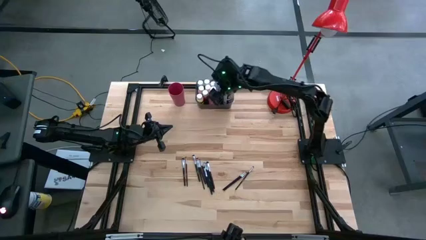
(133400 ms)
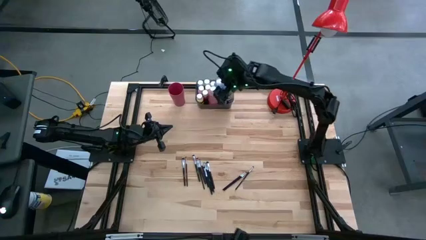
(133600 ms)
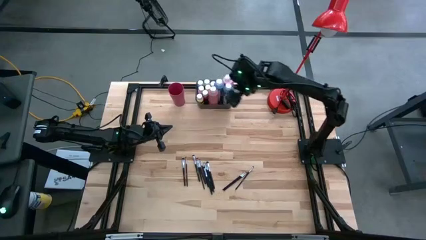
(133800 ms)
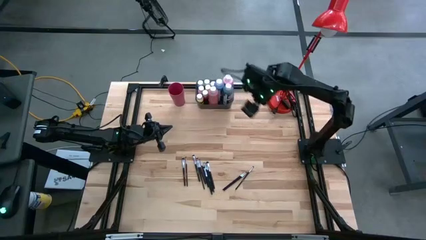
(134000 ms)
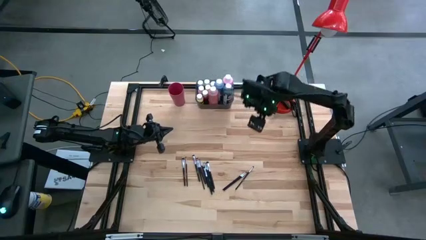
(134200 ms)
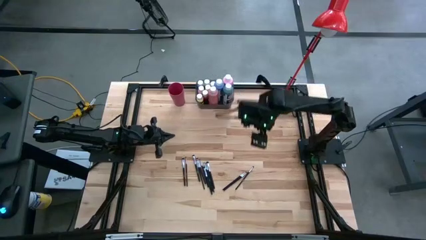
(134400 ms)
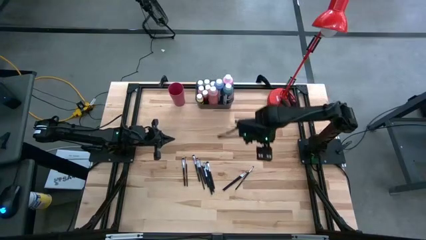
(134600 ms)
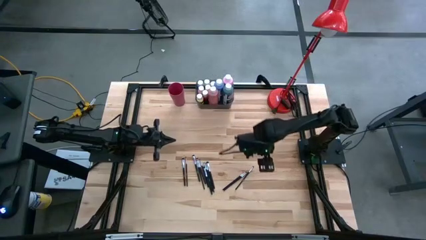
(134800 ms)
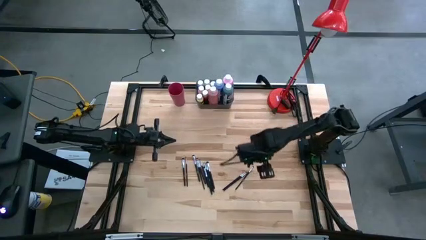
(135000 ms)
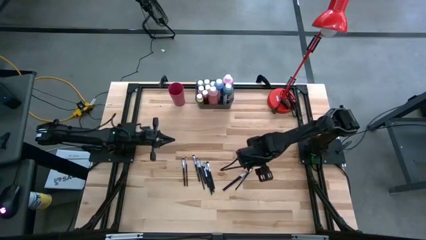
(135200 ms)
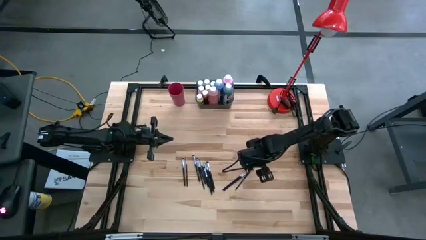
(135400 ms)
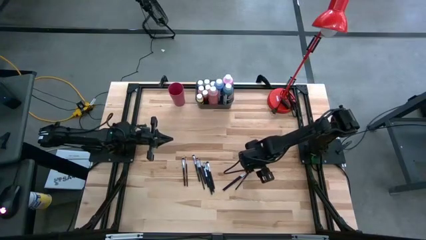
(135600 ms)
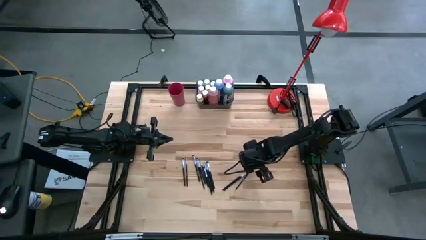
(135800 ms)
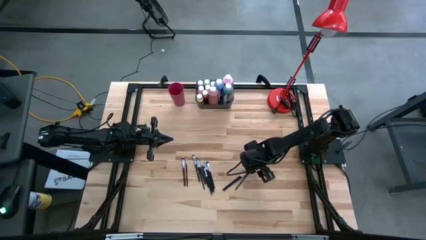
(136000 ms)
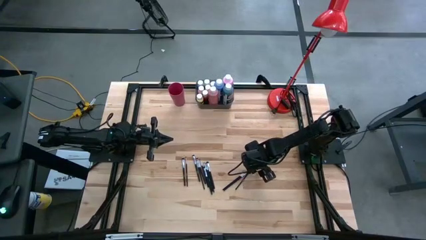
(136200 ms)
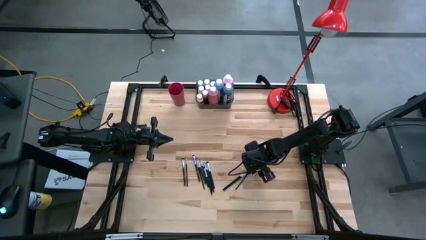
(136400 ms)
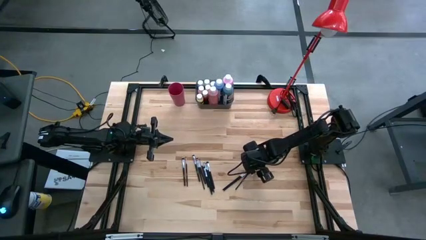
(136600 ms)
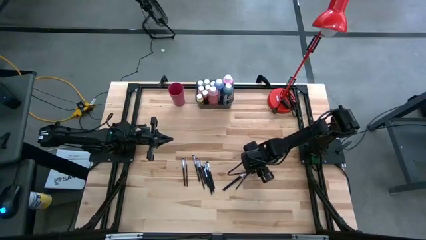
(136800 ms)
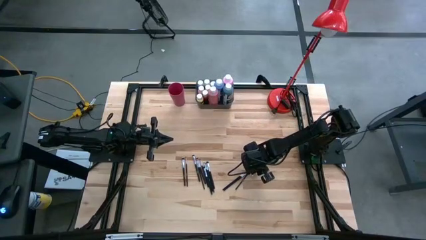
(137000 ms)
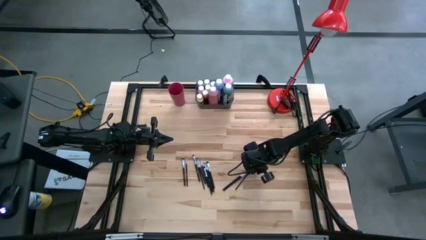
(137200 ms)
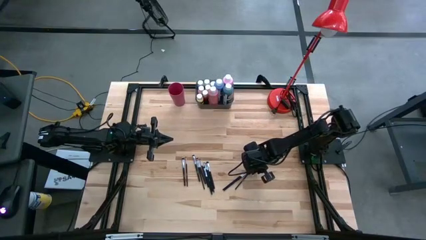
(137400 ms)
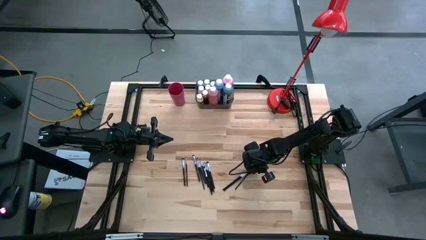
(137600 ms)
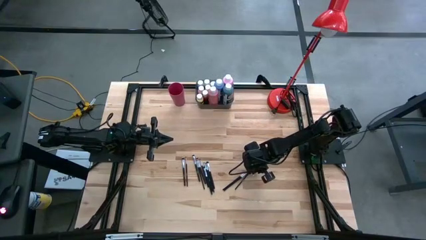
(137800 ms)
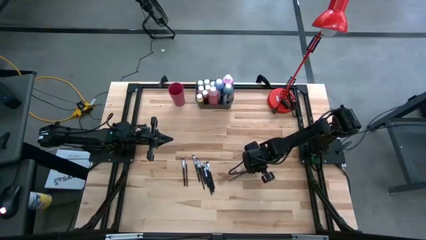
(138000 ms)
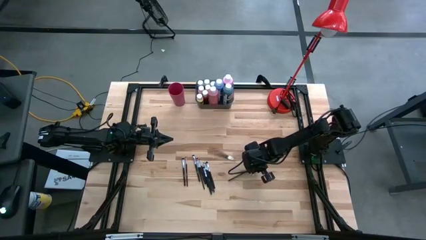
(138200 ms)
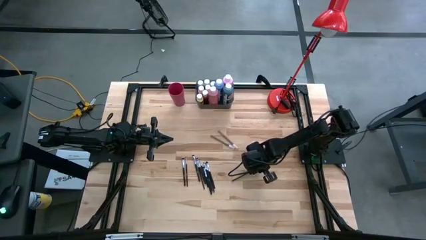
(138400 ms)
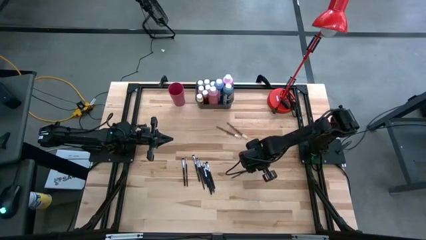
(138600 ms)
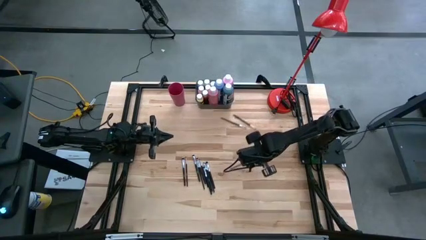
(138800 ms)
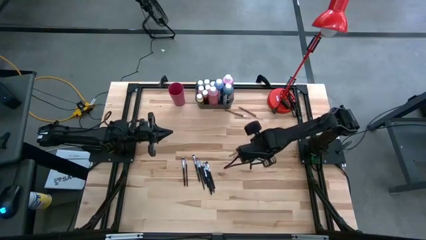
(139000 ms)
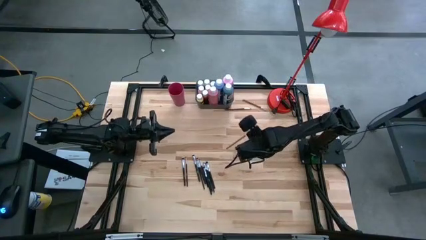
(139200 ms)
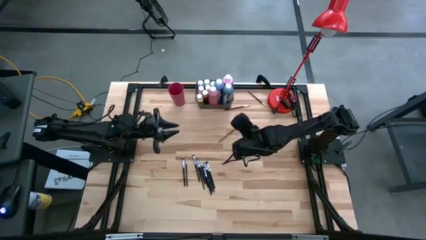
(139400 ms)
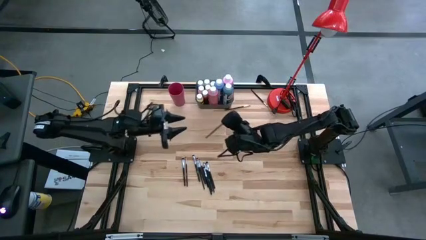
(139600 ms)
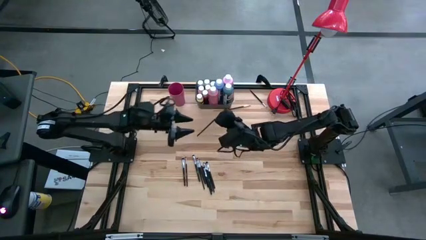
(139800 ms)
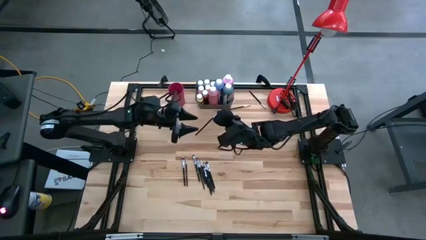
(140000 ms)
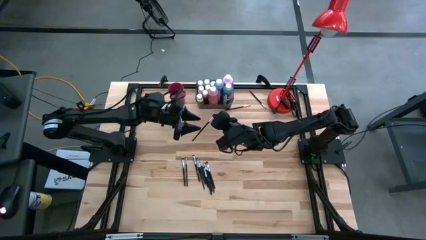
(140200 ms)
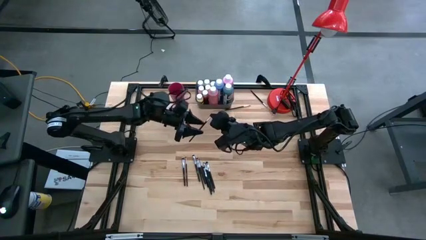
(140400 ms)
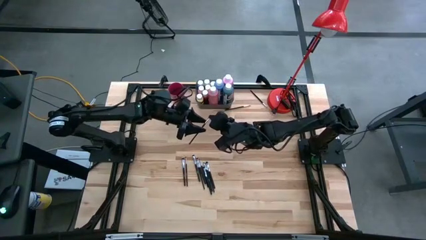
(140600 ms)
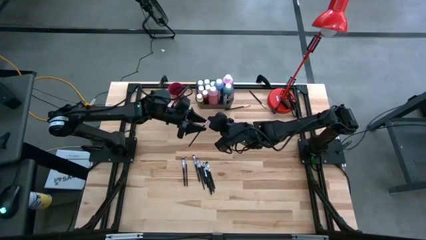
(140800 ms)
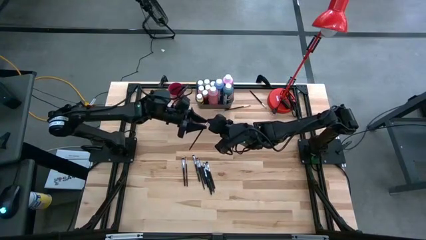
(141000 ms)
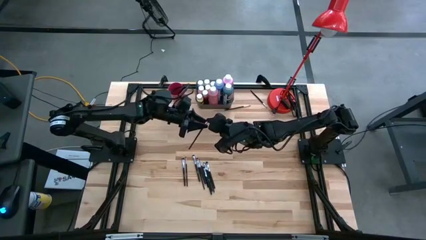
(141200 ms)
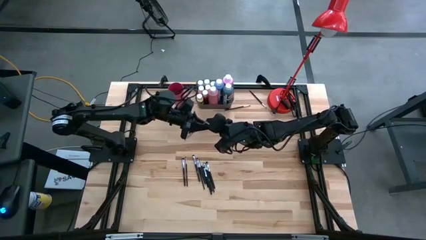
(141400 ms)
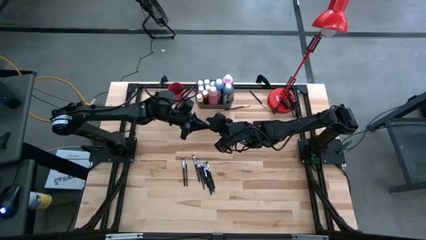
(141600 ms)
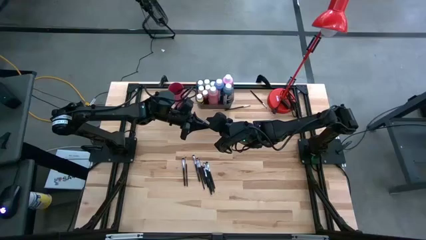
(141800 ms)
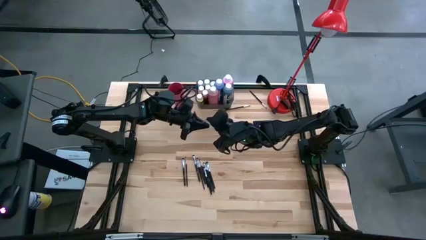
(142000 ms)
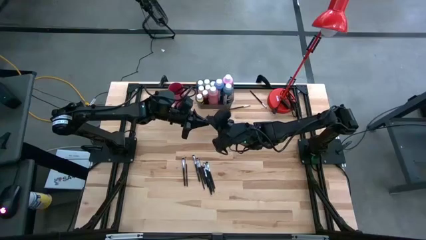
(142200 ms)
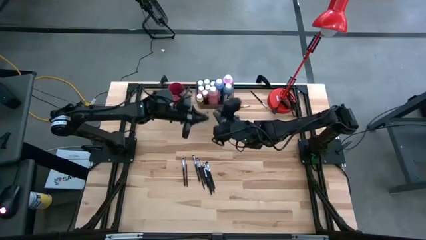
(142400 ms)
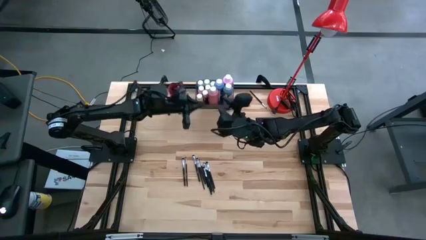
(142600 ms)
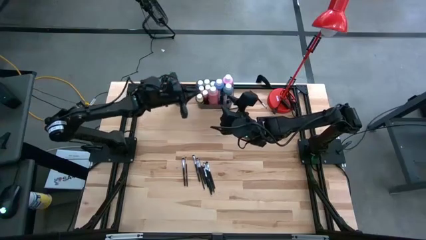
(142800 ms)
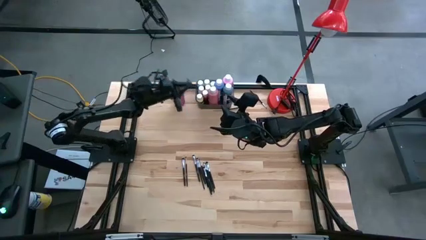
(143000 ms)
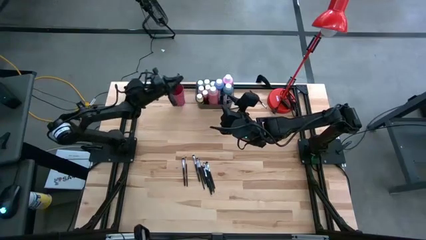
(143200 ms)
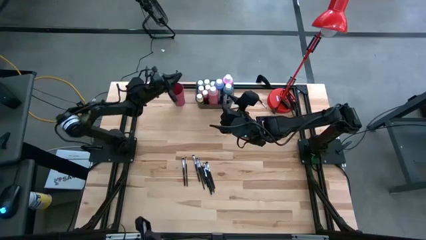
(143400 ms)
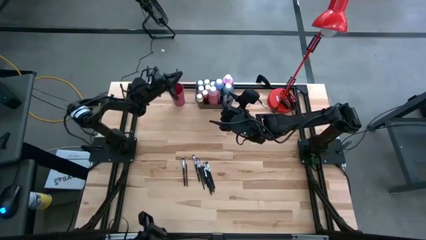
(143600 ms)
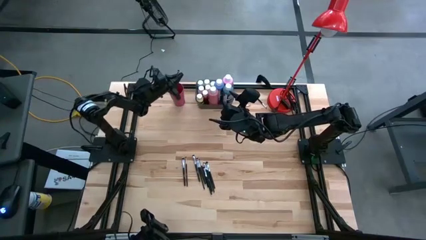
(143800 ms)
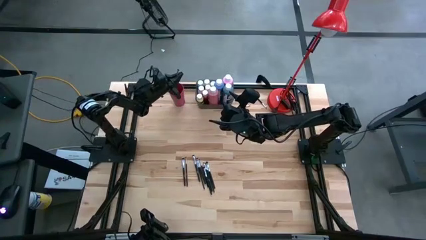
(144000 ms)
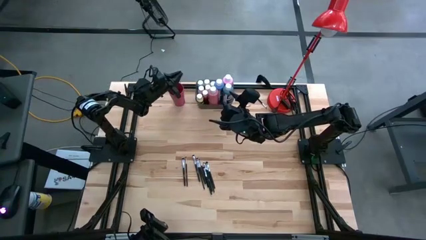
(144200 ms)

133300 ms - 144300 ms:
Task: Pick & Place Paint Supplies
Put the black paint brush into the pink cup
